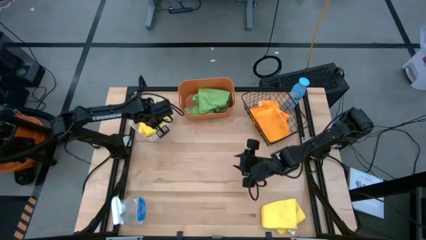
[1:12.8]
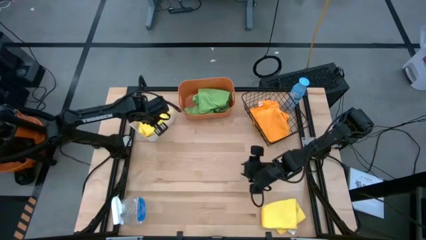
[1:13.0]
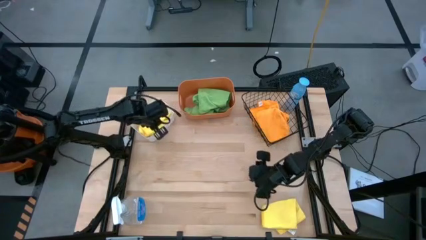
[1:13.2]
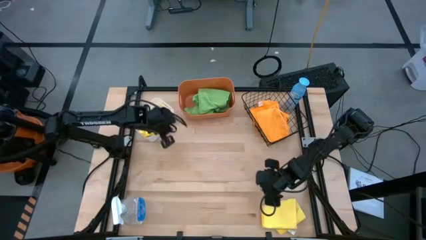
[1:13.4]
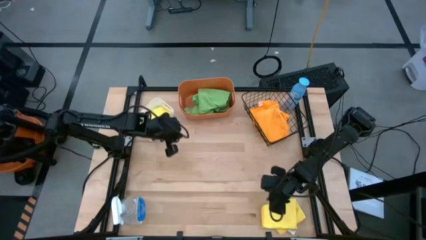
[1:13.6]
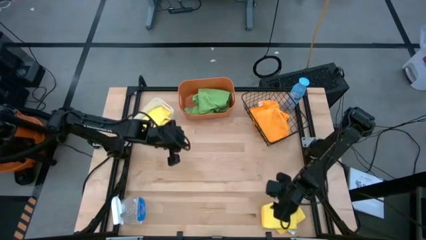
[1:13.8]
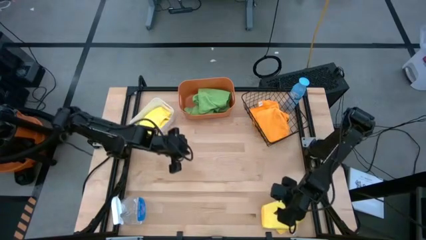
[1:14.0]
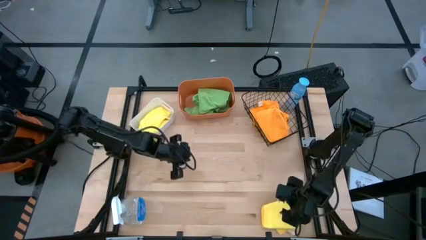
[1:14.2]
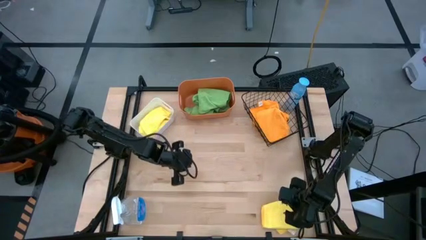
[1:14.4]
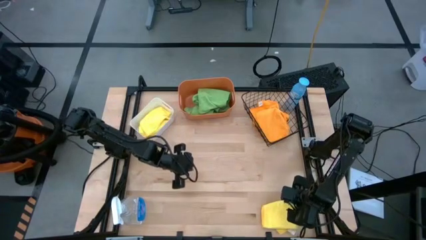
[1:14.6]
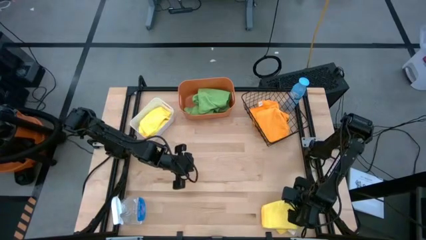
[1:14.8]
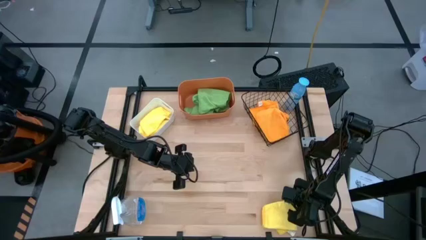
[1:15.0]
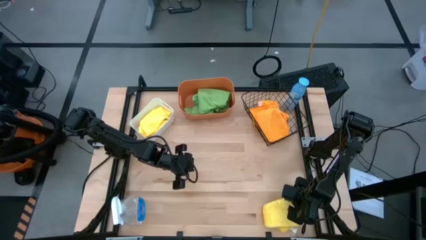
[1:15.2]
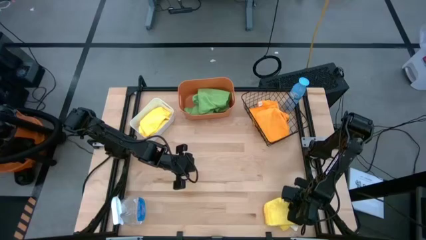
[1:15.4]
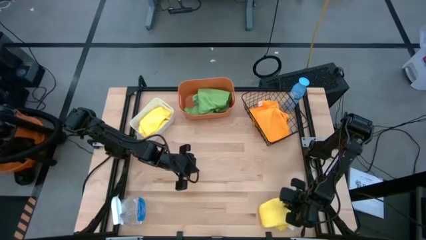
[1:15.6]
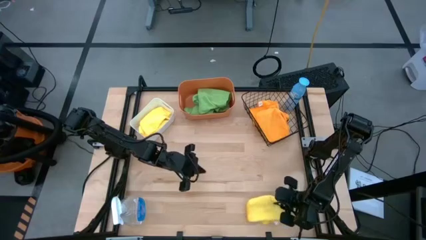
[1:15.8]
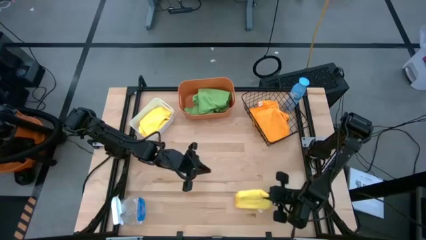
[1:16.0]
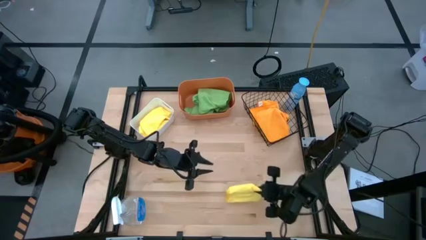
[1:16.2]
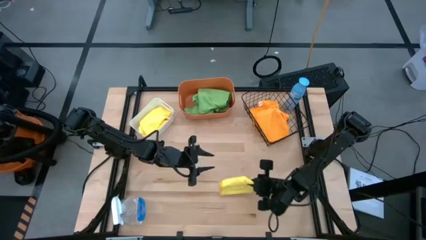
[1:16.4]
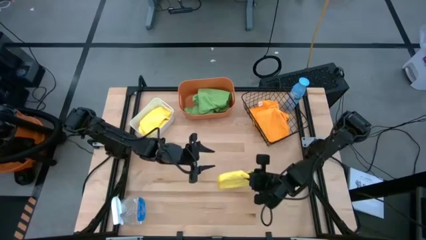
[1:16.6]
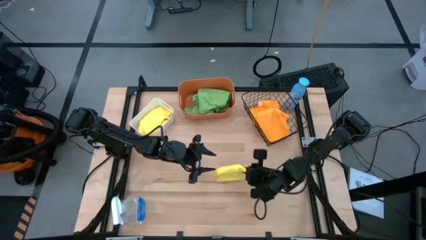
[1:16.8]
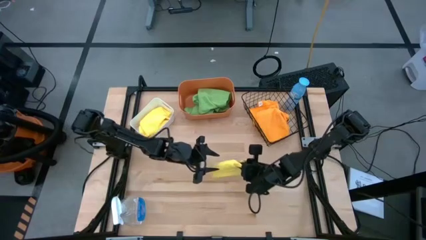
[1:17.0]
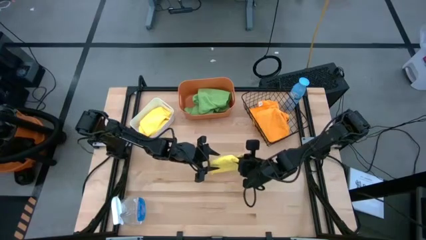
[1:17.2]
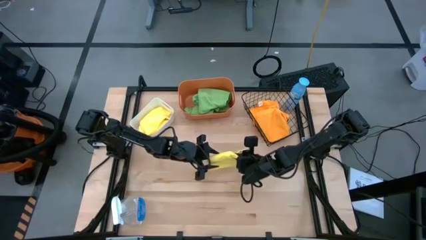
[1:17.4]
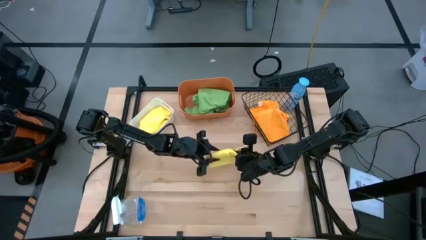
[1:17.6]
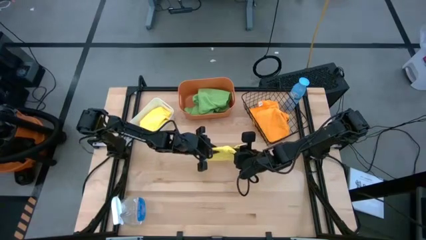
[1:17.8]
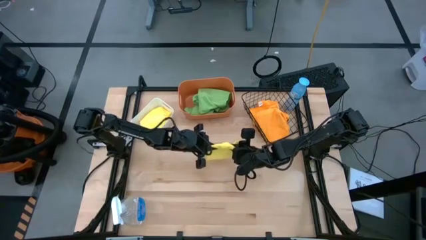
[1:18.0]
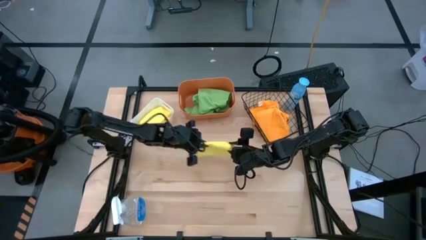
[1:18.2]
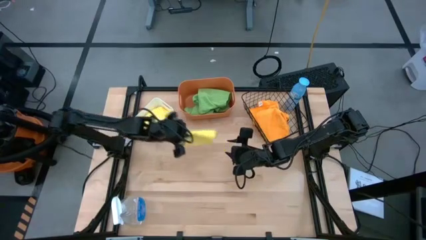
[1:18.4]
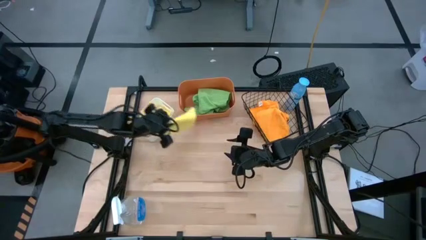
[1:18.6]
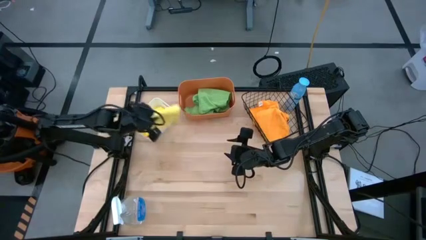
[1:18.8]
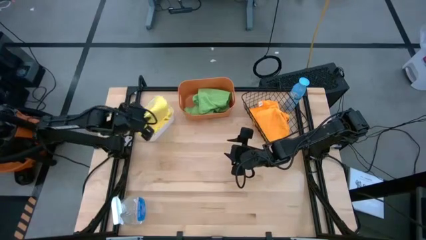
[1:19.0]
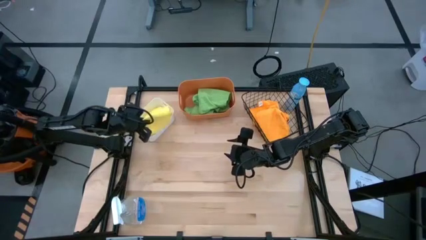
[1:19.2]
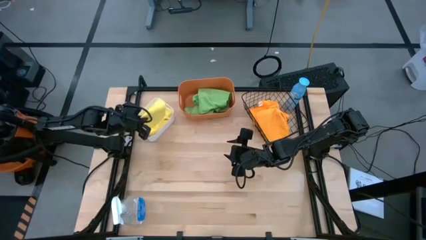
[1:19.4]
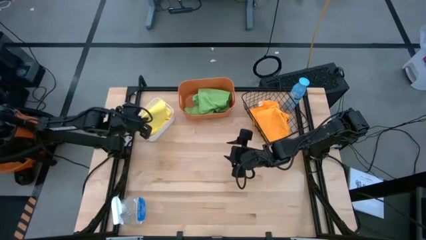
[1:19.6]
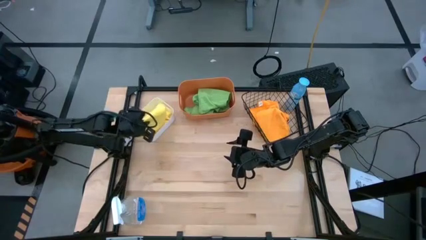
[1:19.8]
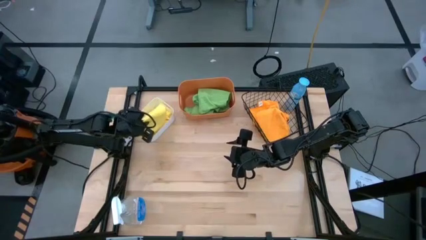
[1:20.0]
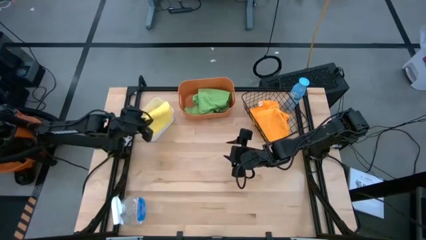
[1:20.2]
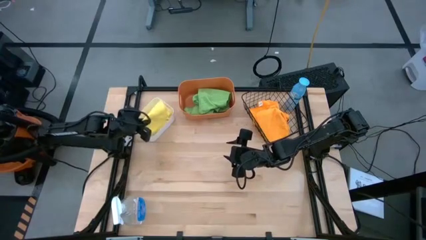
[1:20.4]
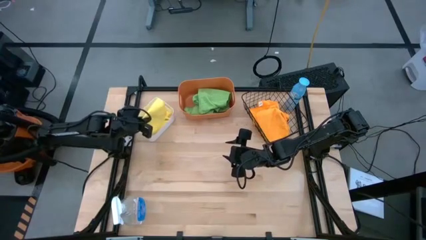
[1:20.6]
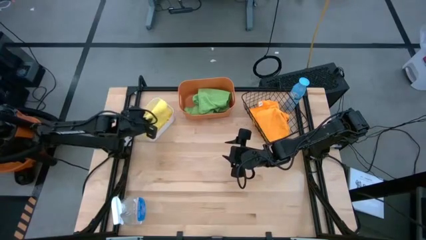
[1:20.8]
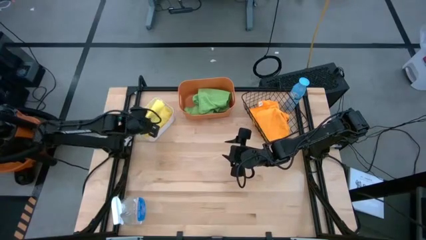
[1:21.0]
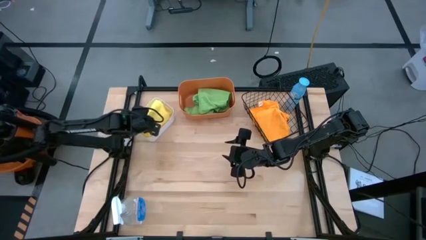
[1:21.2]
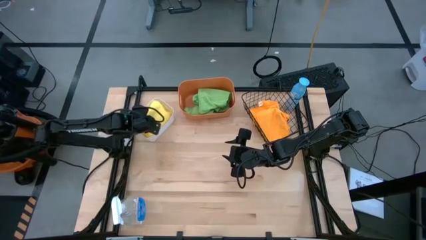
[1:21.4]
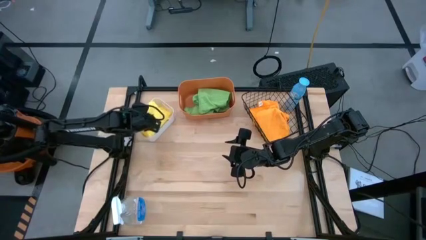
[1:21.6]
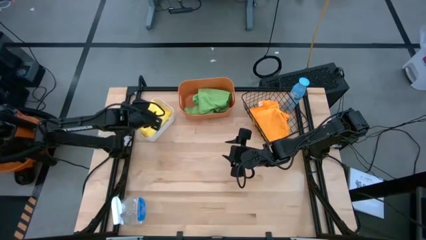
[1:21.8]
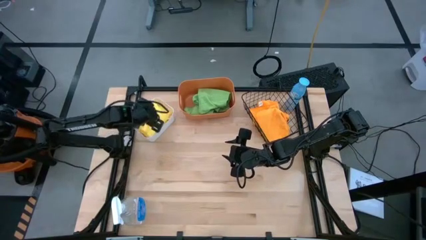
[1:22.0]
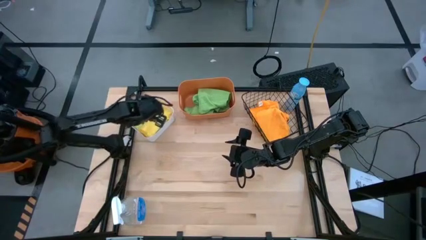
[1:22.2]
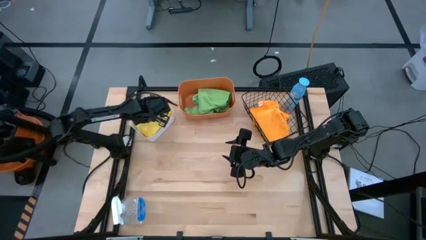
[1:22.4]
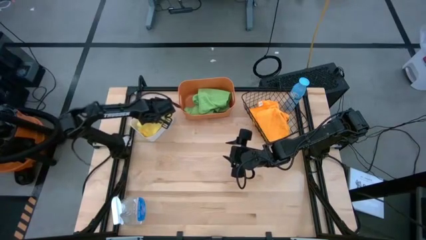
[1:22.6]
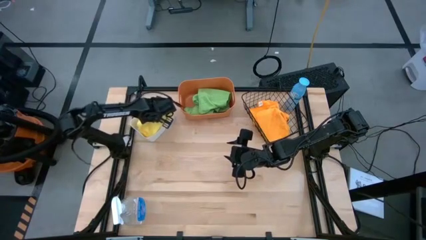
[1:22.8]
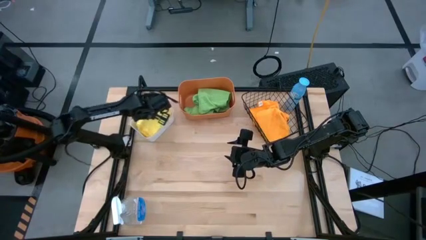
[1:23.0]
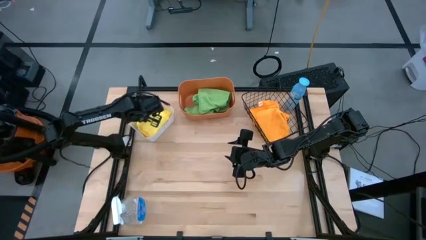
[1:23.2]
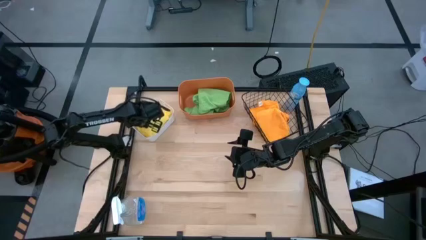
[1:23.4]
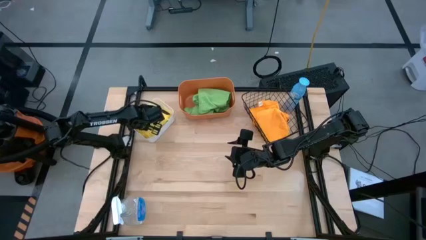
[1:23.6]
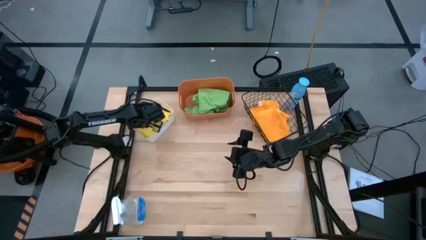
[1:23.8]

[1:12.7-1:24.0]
Task: Sort microfiber towel by color & place in baskets
Put the yellow towel into the white bin
